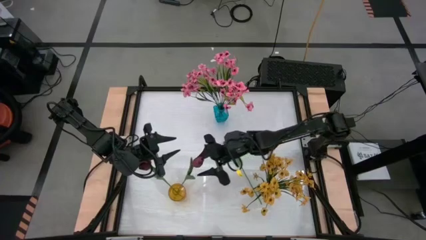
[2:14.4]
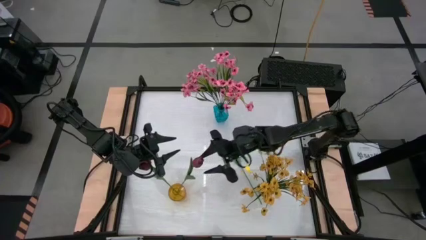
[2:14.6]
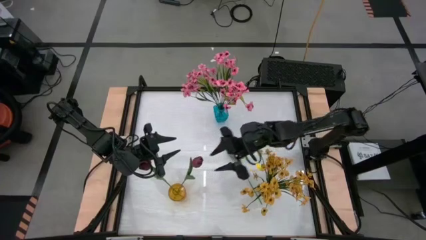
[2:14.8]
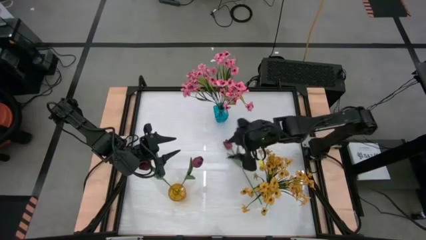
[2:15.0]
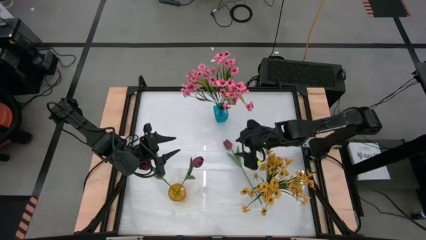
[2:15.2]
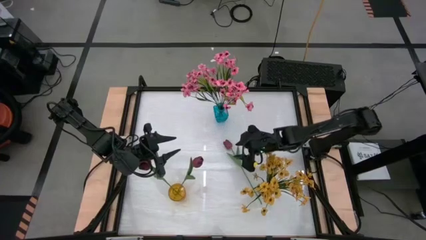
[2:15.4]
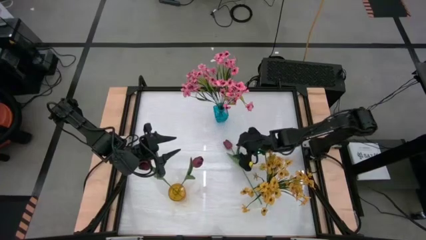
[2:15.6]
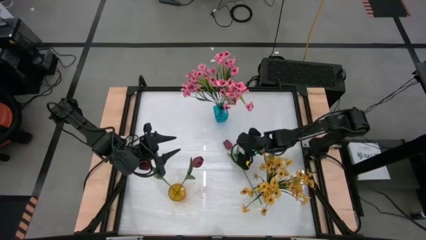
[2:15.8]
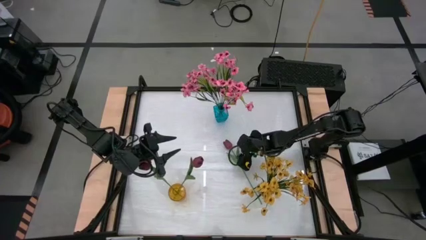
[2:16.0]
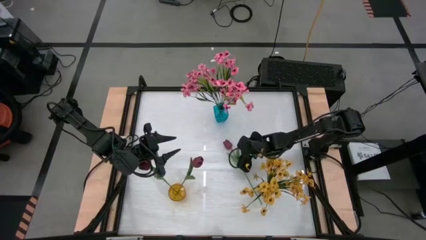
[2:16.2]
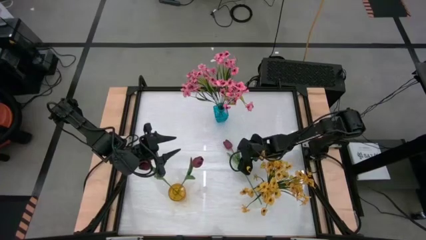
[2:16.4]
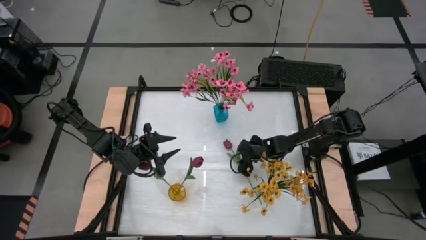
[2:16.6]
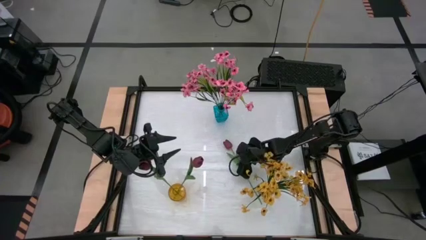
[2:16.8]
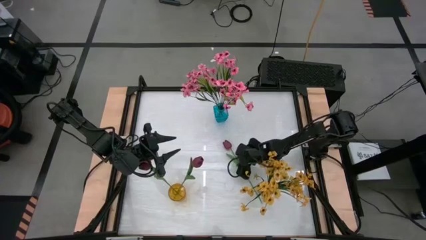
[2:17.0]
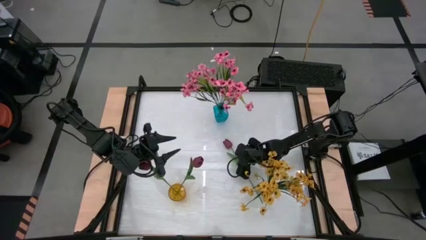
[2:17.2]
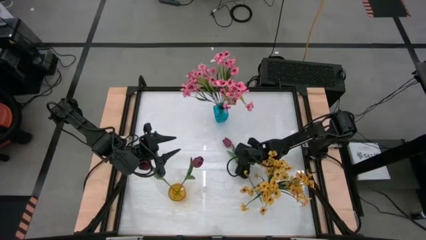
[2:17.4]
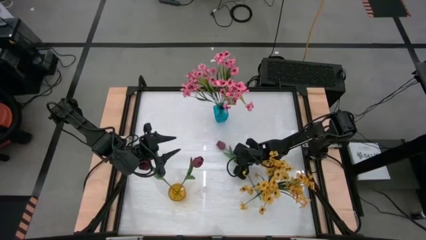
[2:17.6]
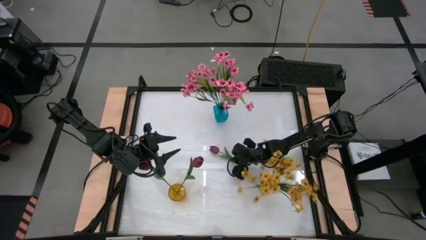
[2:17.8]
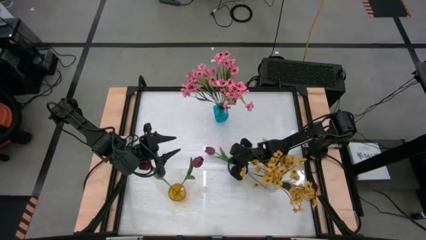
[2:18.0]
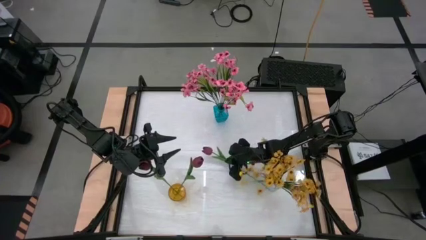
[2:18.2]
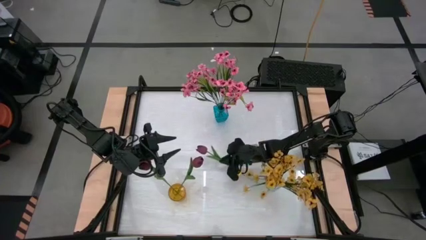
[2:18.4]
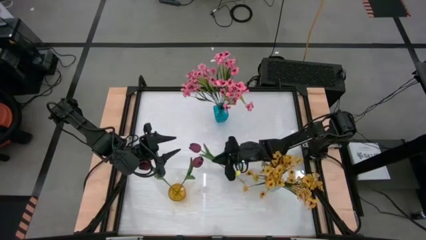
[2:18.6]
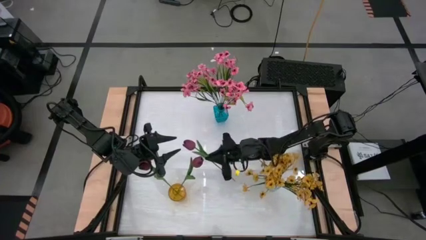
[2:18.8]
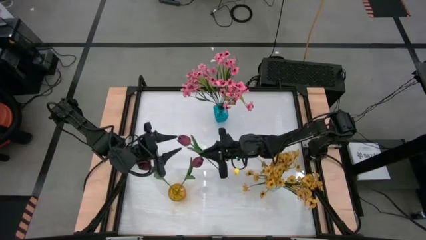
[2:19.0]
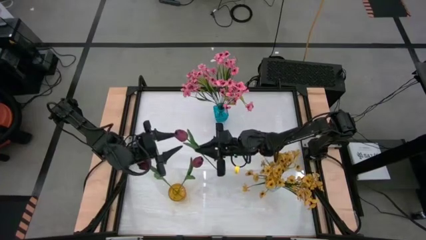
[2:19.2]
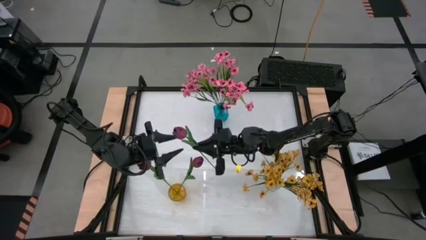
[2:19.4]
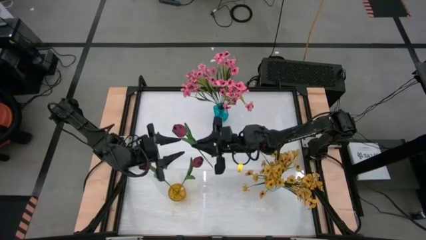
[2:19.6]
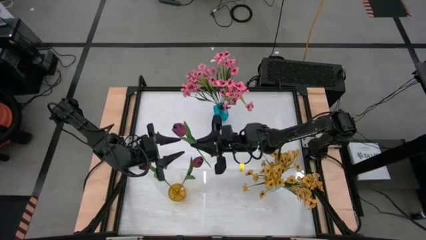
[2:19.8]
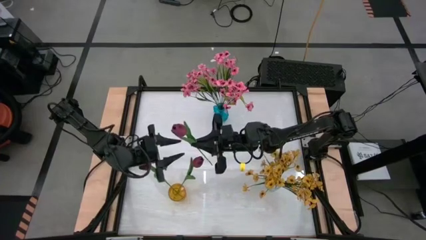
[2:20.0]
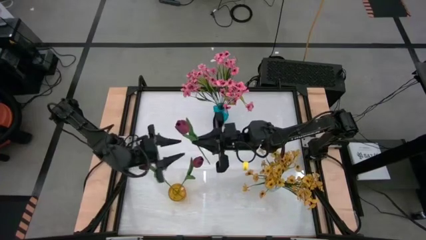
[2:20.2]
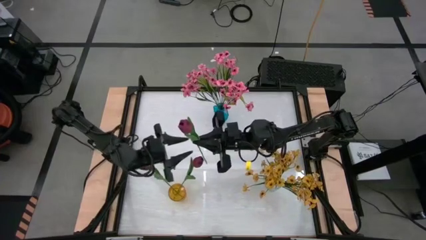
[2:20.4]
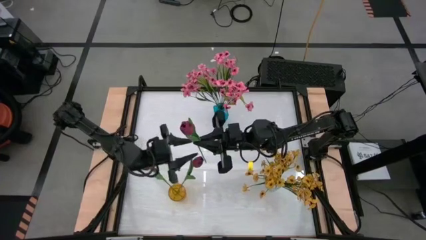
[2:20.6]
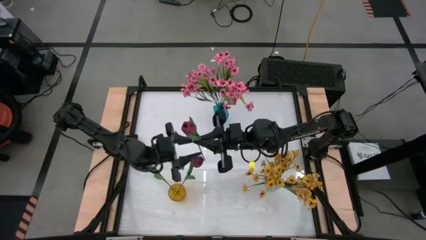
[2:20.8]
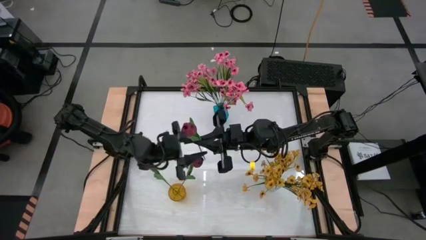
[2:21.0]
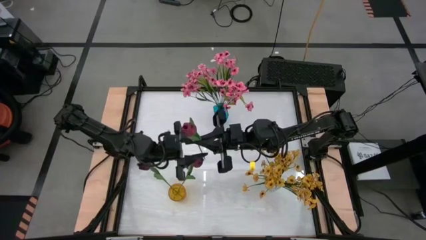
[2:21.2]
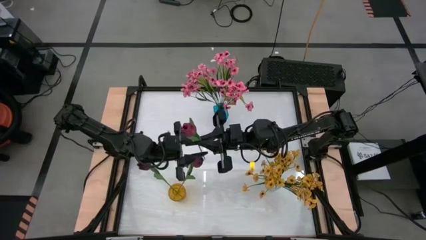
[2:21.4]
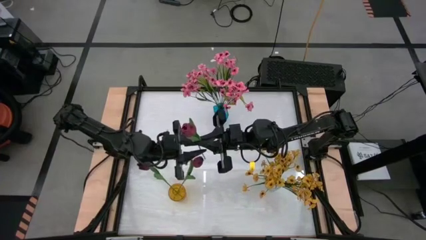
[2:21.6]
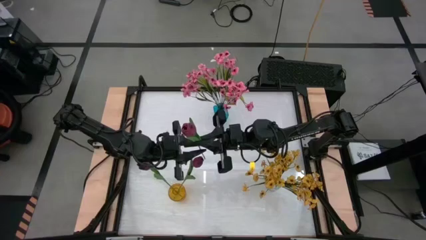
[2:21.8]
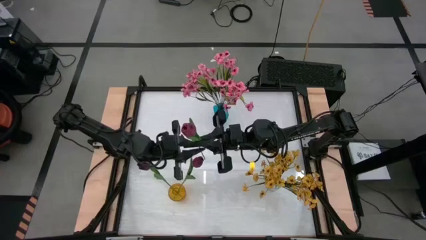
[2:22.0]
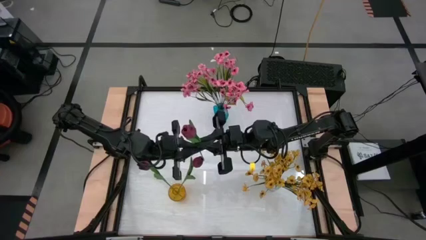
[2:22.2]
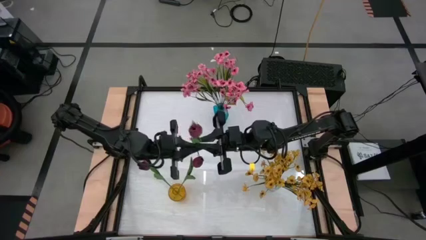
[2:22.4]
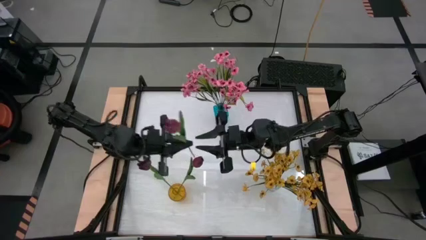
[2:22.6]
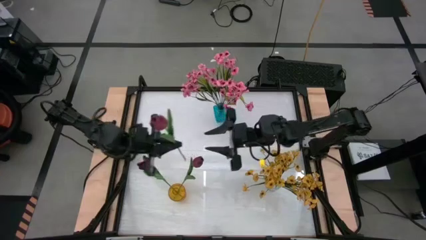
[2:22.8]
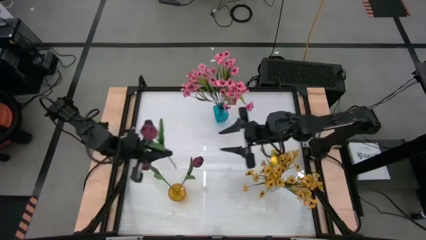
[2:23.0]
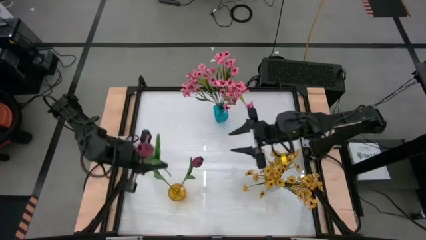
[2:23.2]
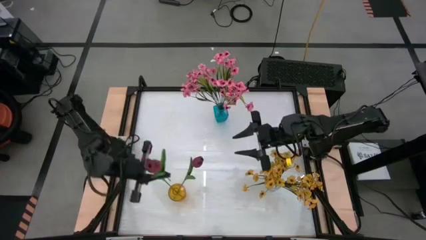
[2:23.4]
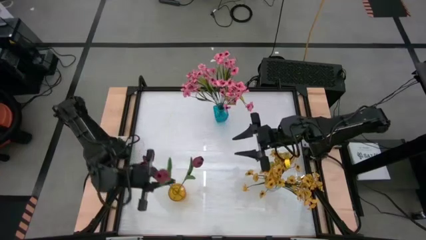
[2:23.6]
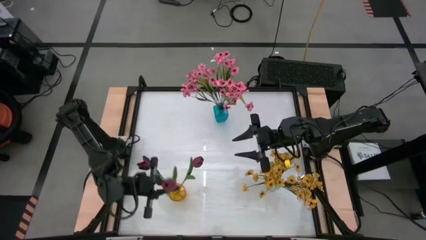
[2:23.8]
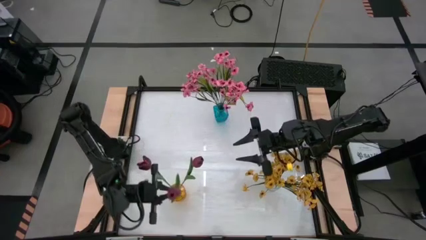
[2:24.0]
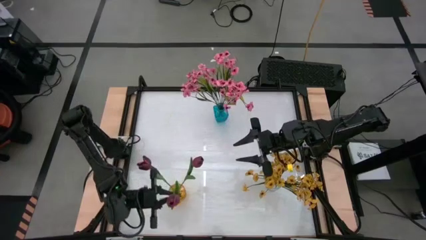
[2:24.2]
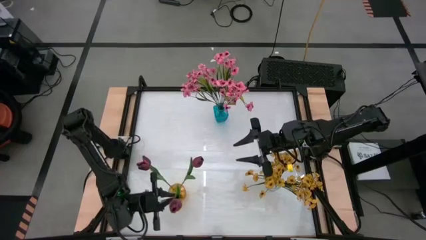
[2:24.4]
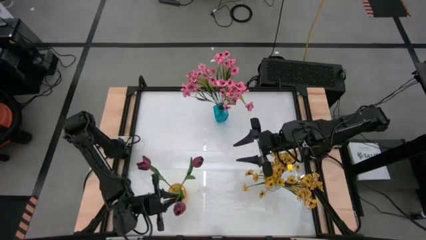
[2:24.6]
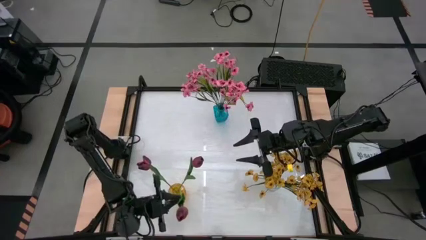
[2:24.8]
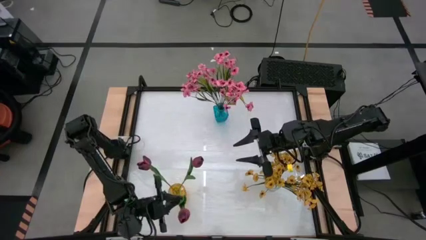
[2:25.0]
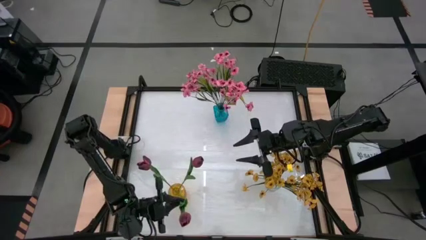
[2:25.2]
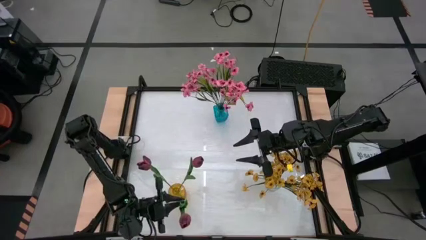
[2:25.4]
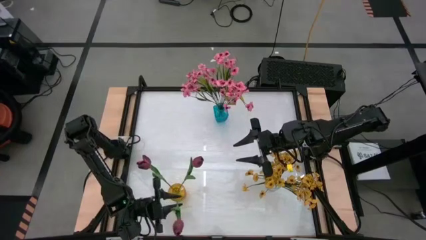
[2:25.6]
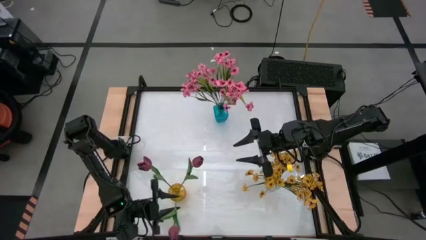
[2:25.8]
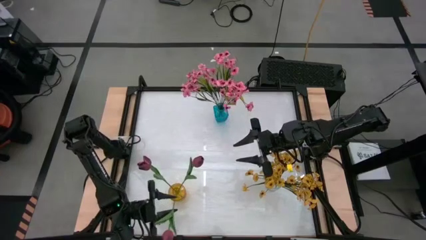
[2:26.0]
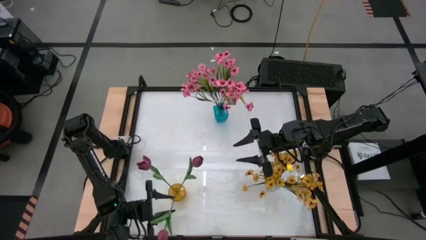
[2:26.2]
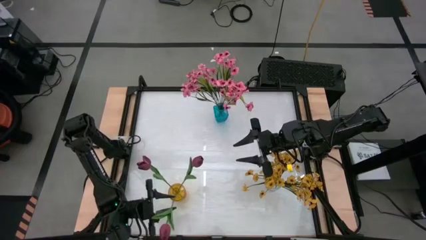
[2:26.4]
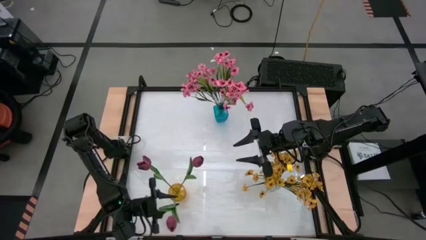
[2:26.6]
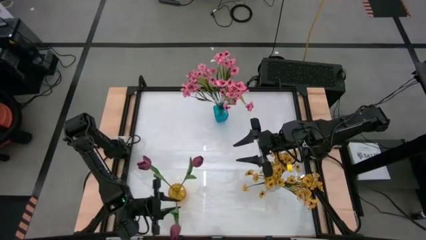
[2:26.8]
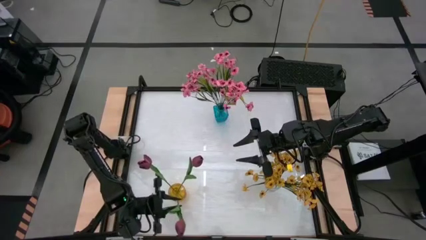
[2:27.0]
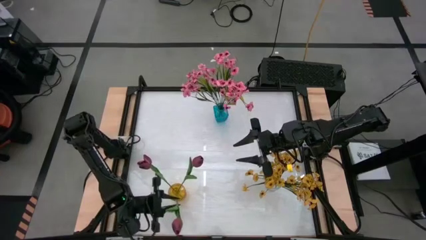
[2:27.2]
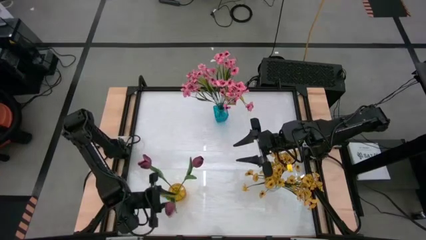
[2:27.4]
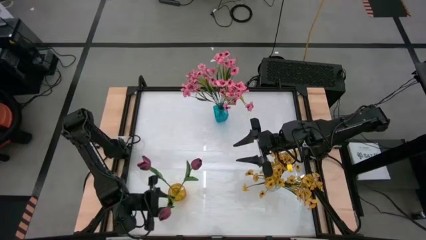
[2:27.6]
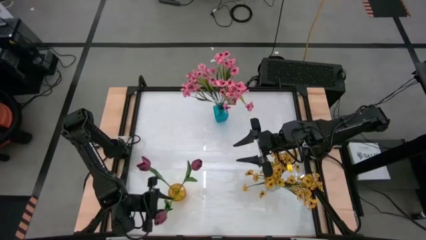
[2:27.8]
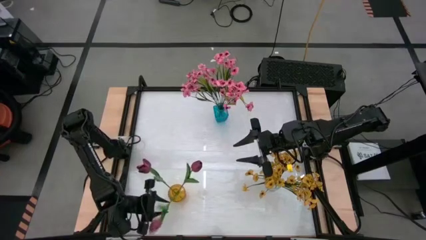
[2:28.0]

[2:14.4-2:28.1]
Task: Sort flowers into vase by color
Put the dark red tulip into the yellow vase

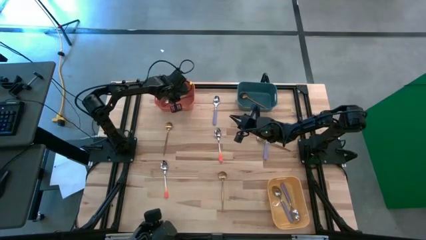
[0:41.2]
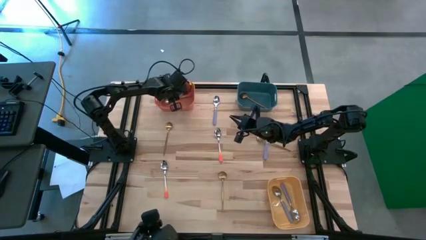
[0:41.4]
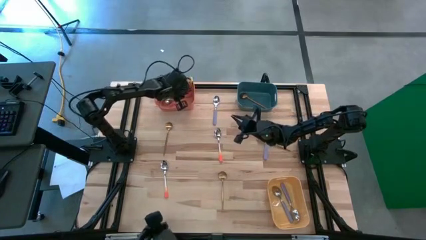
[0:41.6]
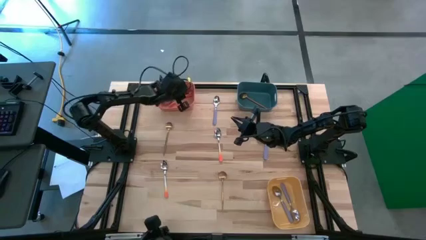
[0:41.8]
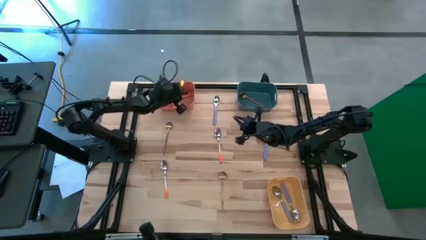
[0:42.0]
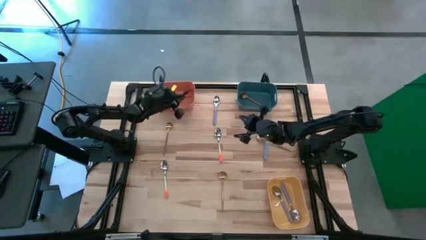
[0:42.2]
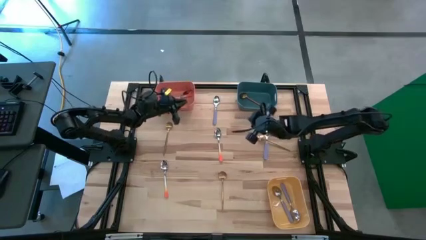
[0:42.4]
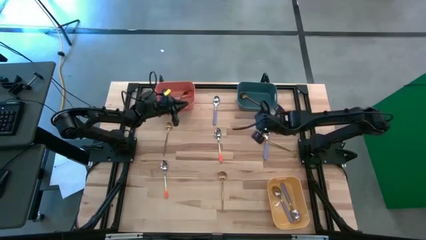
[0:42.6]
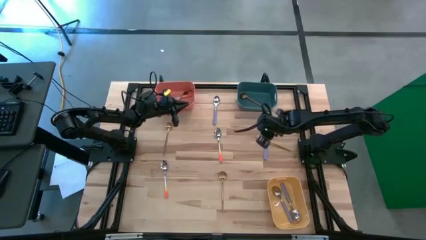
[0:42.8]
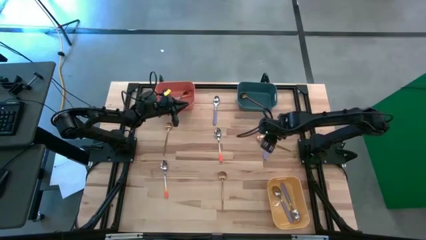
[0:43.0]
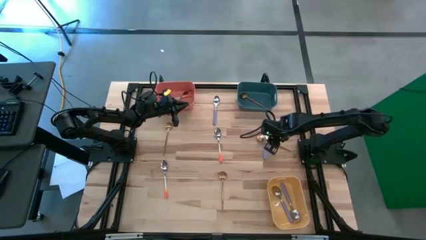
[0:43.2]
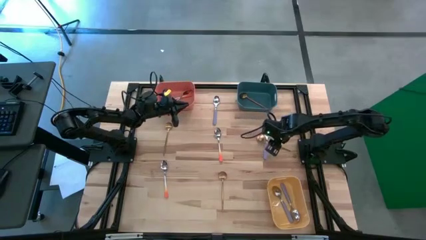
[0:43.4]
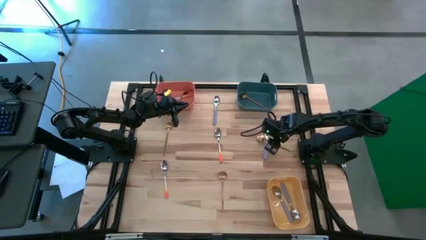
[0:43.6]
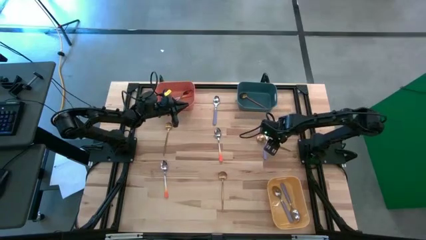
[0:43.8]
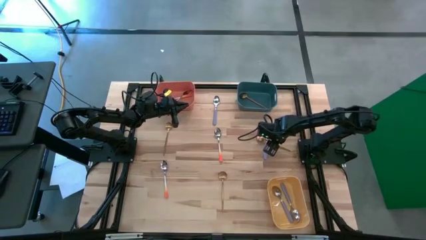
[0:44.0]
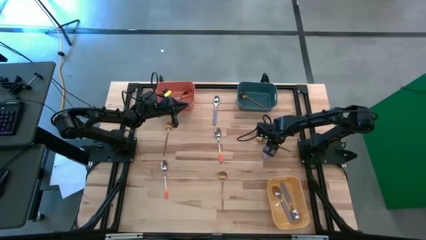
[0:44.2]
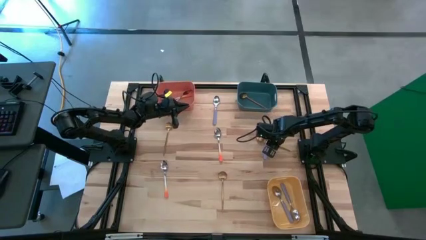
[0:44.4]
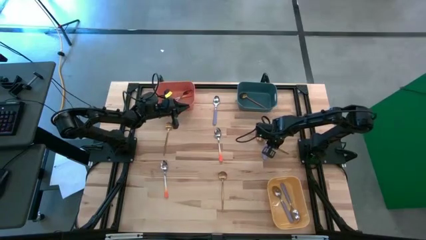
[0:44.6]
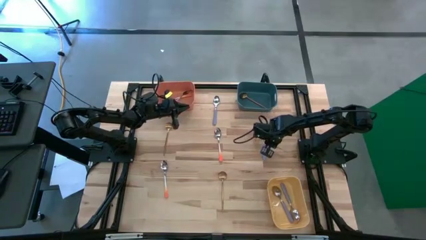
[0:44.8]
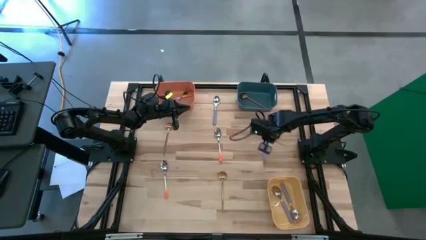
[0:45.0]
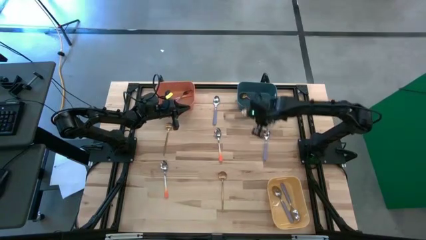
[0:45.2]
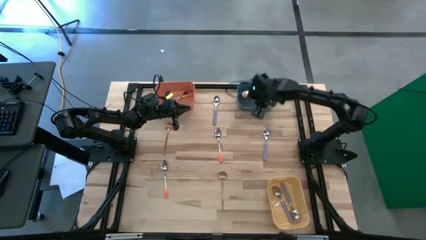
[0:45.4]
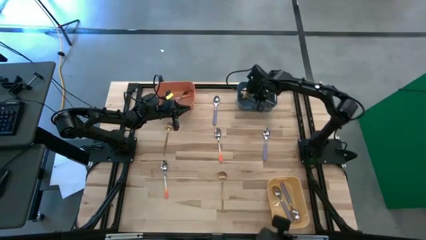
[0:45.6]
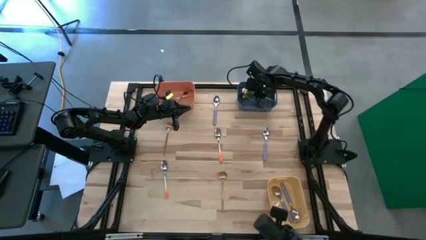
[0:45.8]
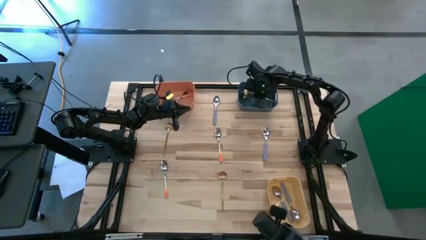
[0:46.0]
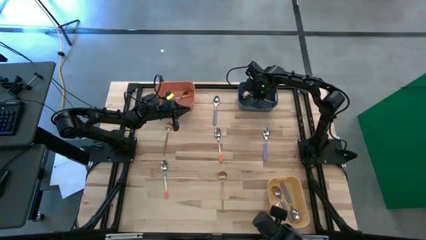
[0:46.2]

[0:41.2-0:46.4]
Task: Sort silverware by color (type)
Put the gold spoon into the blue bin
